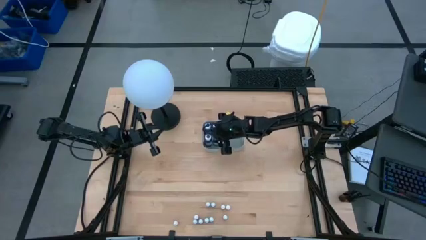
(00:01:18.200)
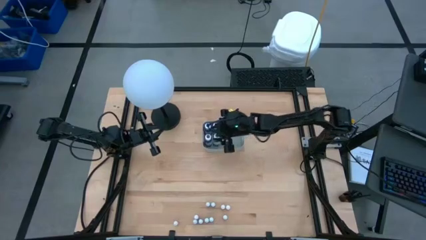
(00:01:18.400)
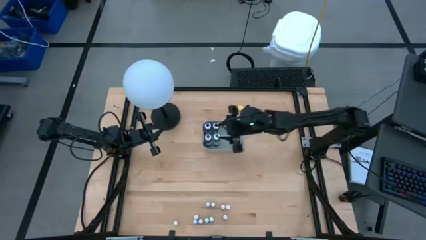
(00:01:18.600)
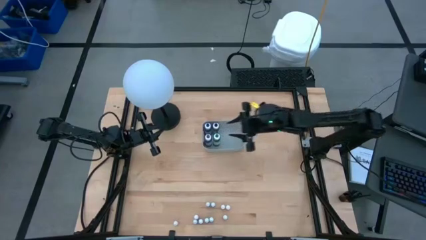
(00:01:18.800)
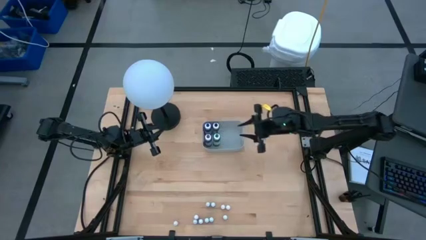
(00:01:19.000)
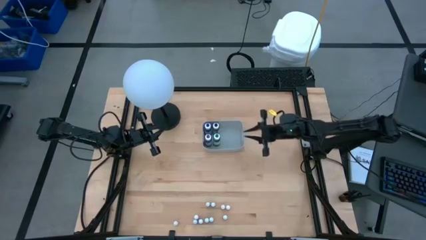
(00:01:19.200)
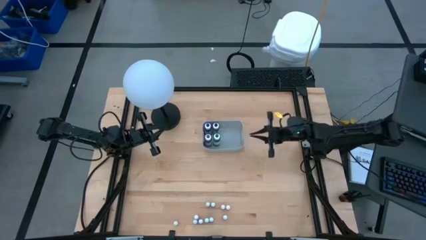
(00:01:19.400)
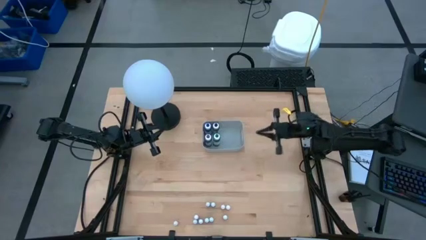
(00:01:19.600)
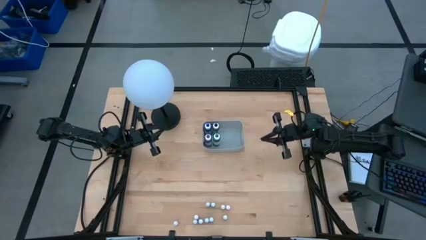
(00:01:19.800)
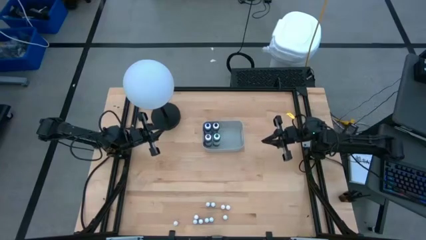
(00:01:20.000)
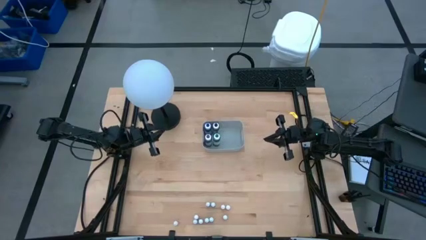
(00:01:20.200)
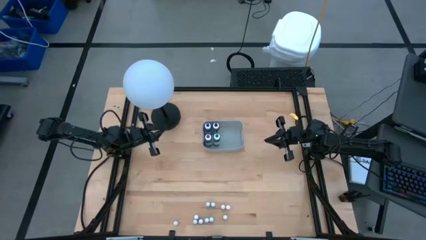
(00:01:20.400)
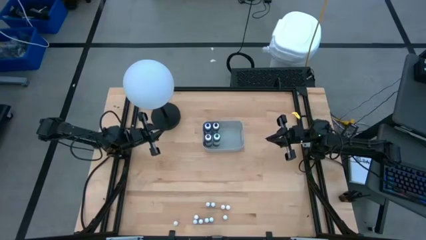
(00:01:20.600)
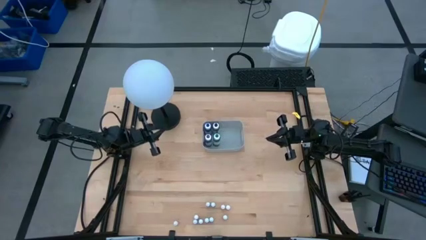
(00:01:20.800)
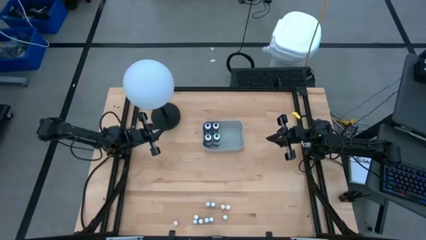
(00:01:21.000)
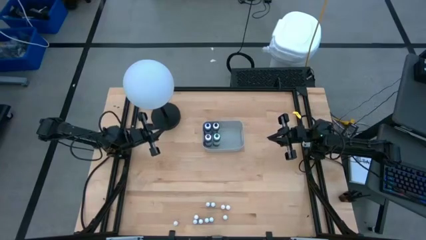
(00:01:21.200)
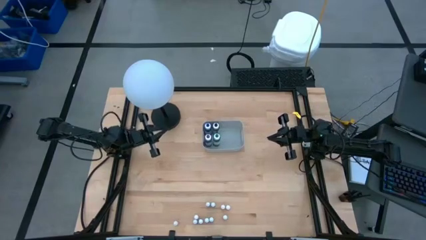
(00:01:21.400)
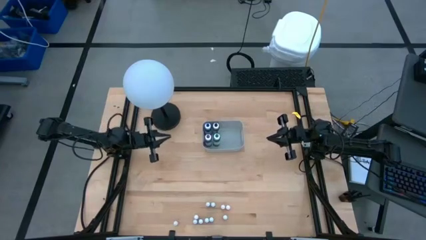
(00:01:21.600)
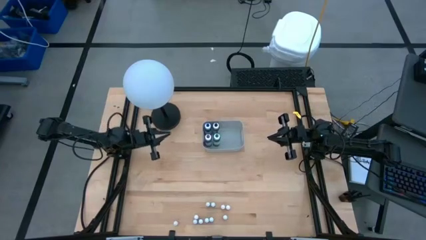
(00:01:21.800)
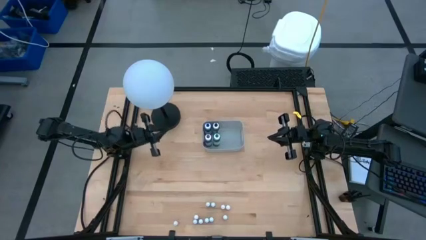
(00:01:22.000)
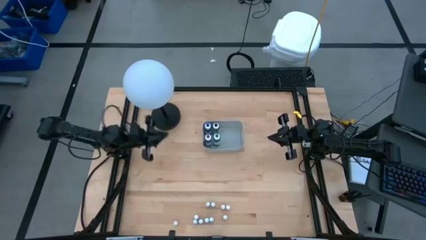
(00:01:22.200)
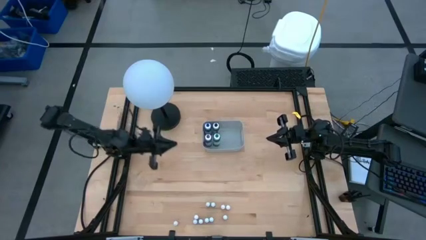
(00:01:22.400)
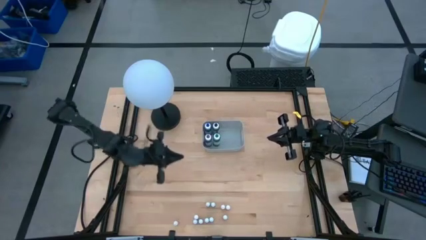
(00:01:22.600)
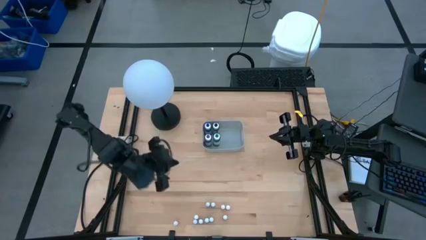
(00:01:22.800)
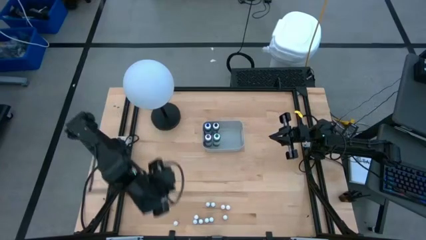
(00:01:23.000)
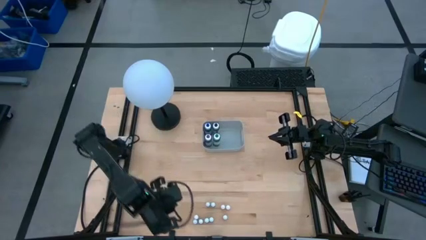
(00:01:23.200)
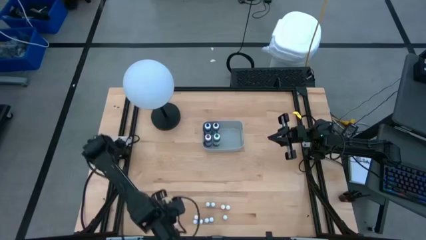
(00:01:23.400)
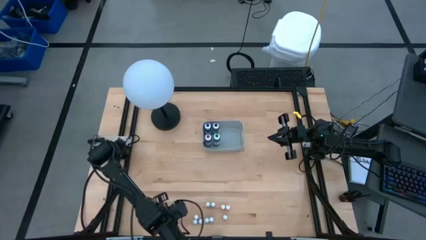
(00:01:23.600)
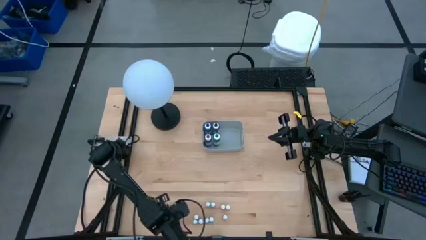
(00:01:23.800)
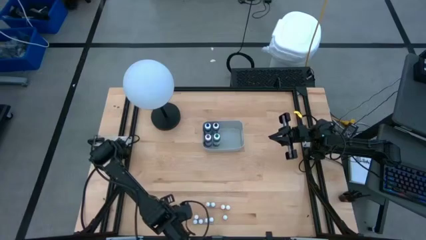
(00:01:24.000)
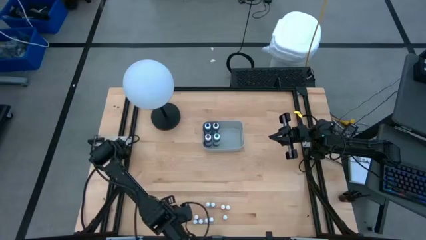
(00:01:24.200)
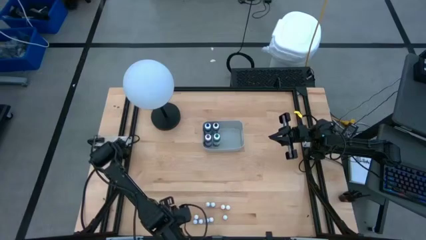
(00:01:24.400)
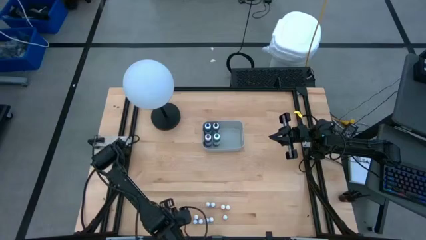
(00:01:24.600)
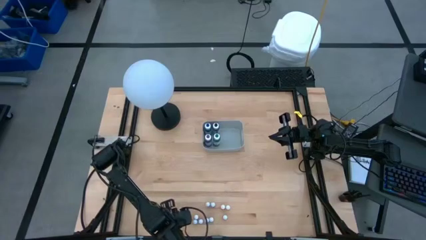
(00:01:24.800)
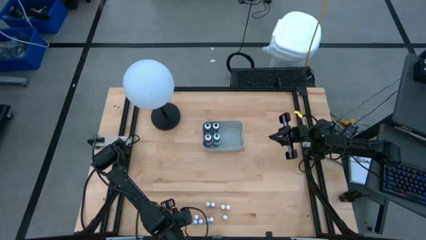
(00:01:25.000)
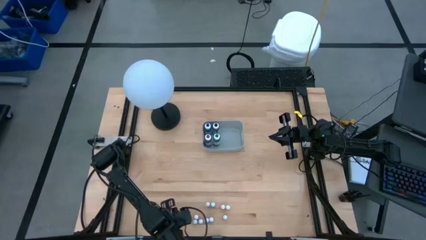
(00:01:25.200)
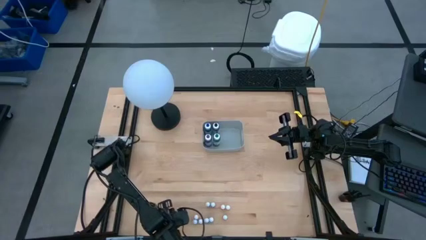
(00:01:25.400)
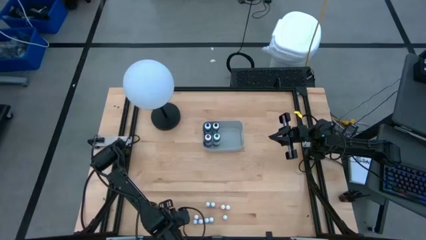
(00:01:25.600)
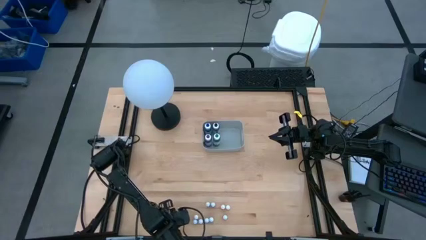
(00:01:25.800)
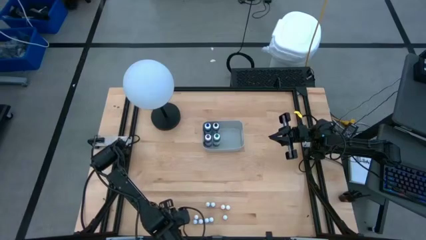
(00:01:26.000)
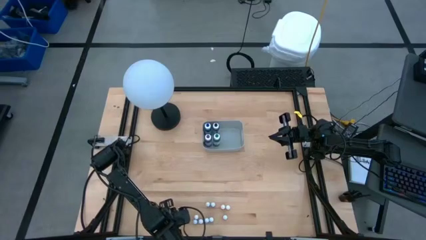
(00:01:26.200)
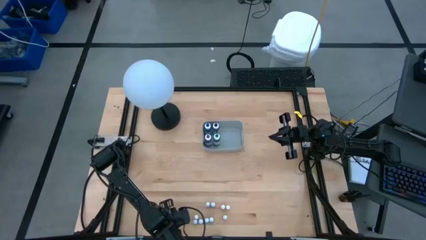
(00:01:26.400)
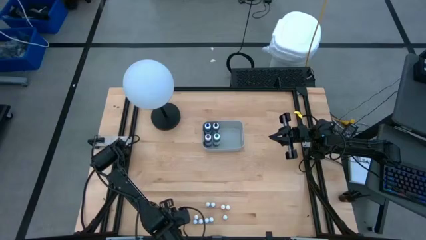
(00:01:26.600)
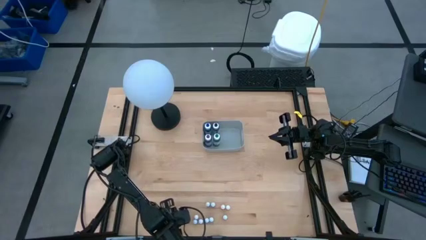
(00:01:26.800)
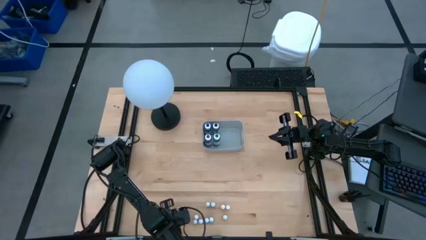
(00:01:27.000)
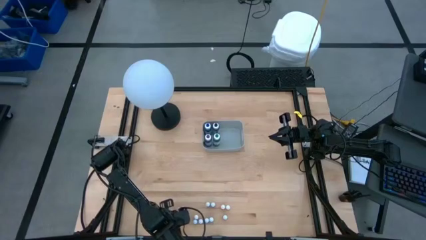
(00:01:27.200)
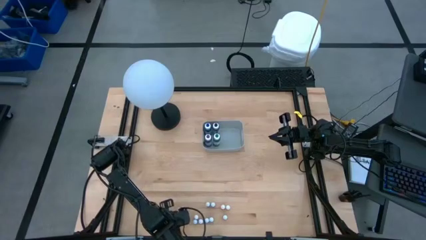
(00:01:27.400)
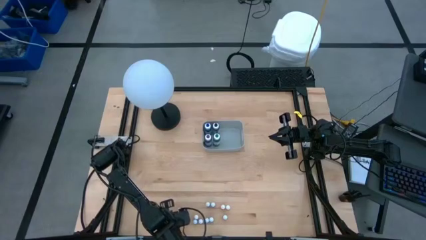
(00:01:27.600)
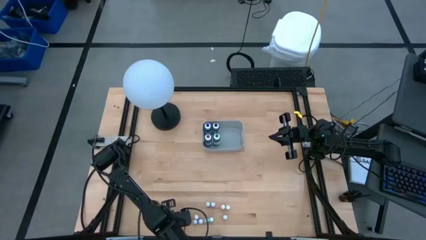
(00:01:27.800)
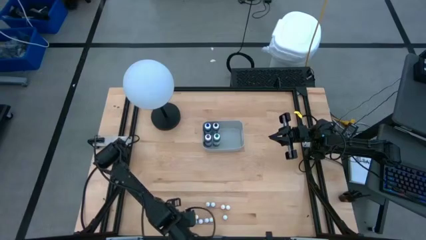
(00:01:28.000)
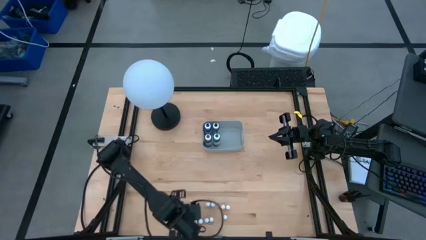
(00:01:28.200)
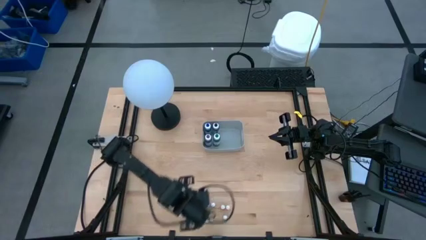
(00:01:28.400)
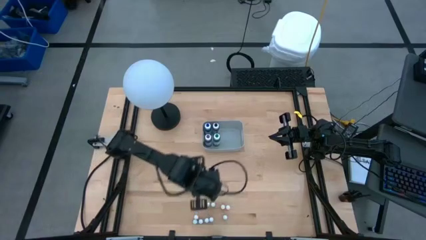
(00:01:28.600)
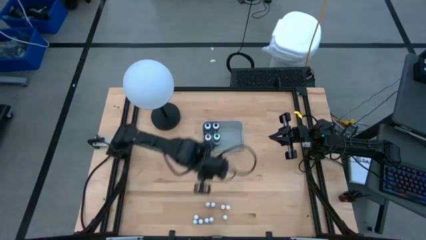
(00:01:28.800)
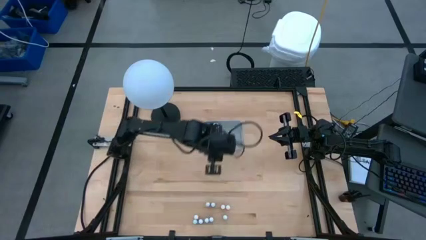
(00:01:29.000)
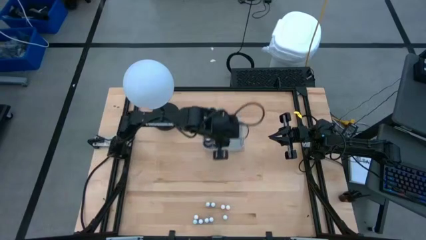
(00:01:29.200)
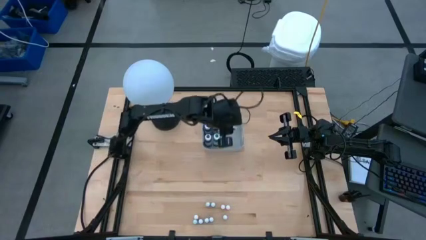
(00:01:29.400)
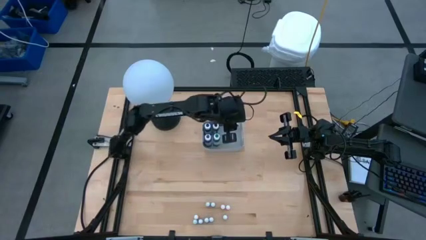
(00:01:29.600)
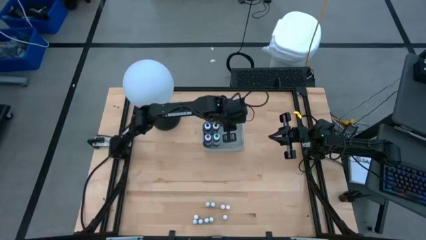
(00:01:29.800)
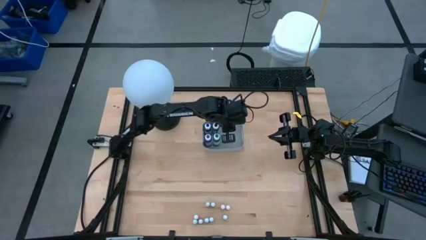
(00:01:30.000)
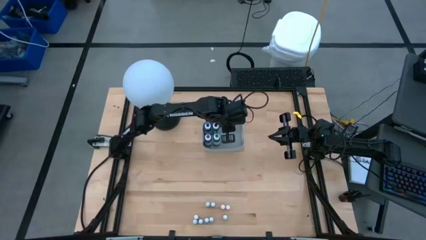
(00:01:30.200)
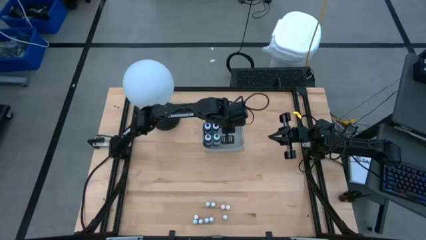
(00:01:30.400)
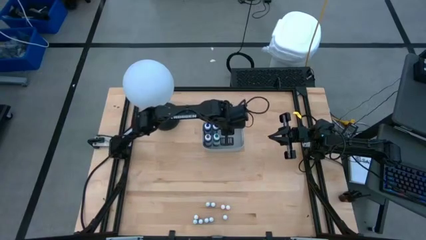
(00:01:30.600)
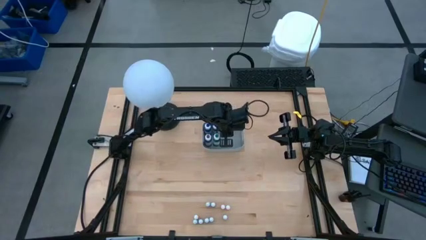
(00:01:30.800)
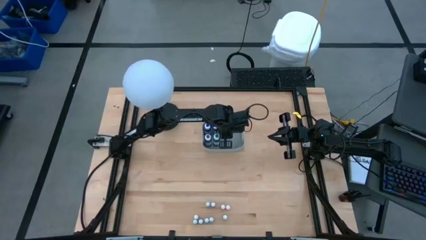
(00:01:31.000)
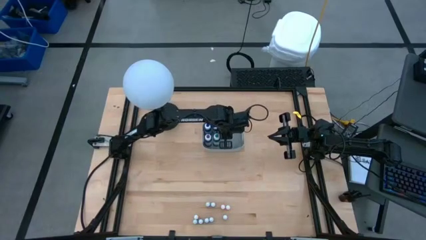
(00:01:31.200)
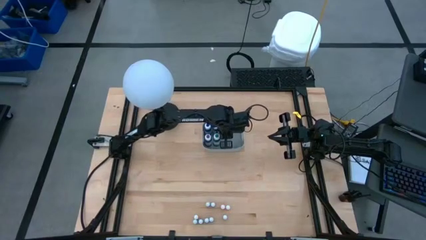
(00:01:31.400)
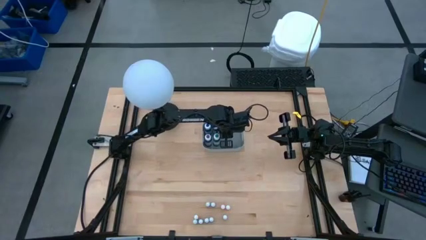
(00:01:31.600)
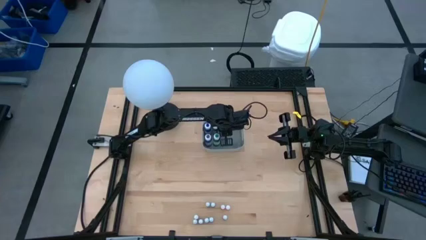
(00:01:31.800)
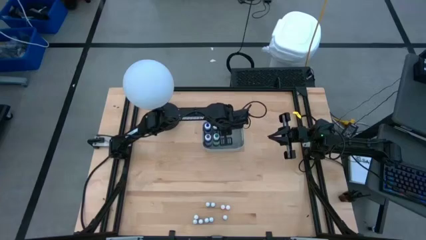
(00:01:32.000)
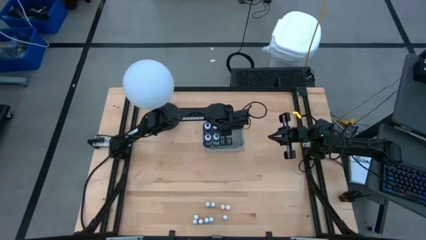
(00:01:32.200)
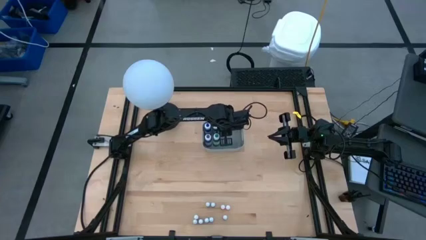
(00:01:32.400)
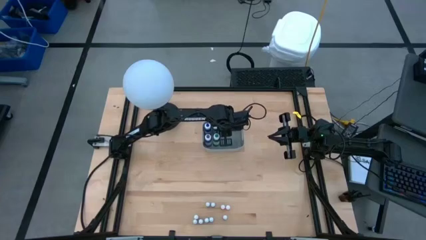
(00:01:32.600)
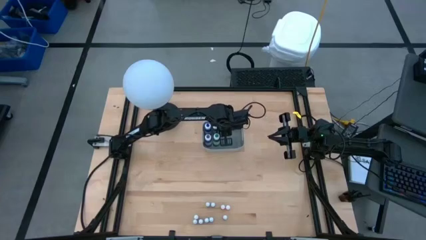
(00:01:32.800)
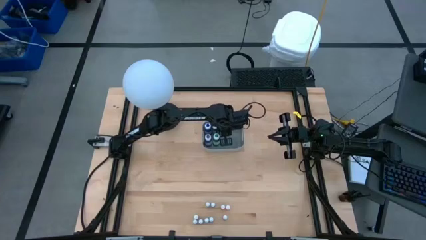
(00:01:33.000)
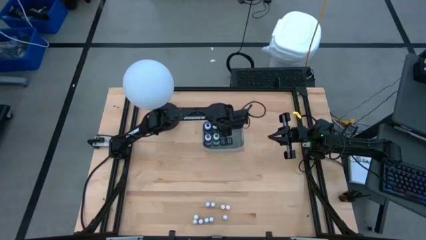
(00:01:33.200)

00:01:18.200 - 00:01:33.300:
Task: Pick & Place food coloring
Put the small yellow food coloring bottle into the gray bin
